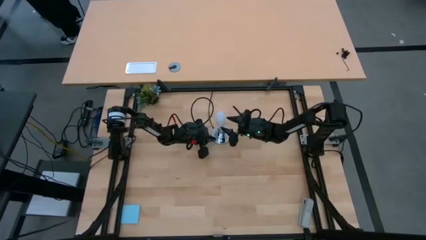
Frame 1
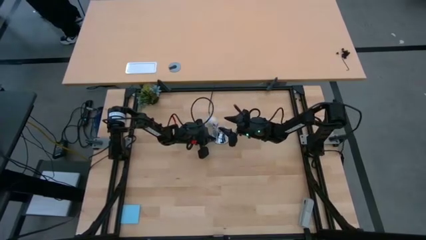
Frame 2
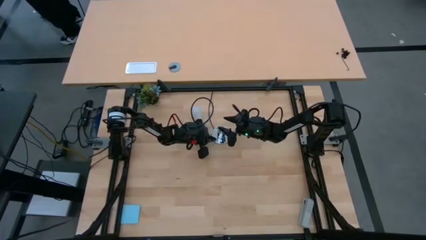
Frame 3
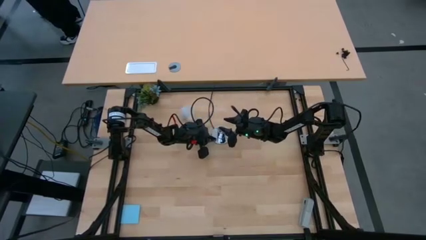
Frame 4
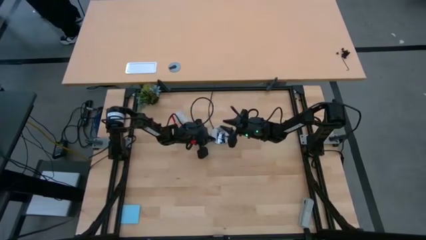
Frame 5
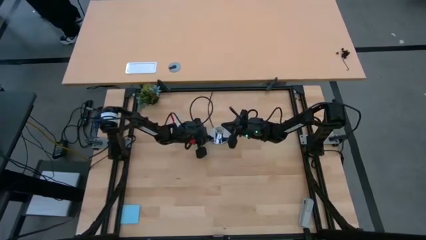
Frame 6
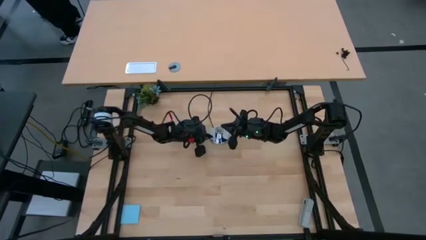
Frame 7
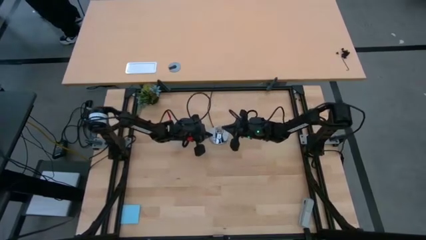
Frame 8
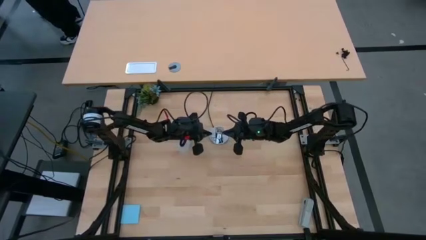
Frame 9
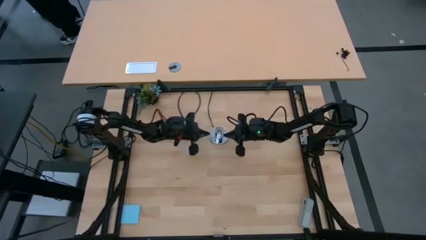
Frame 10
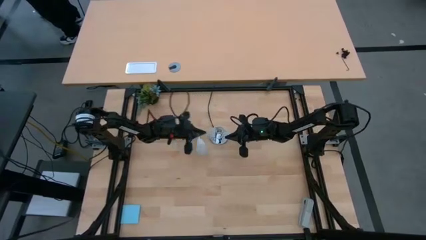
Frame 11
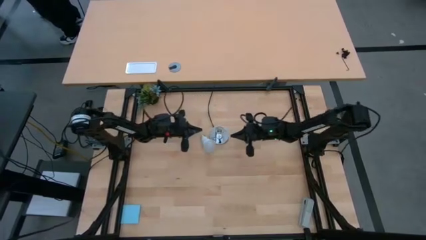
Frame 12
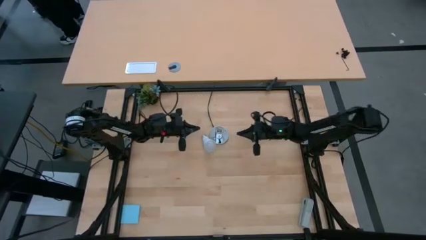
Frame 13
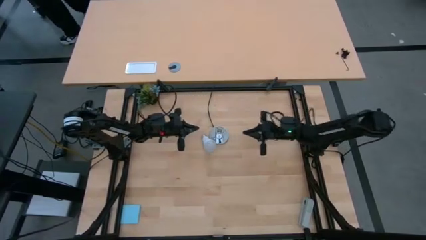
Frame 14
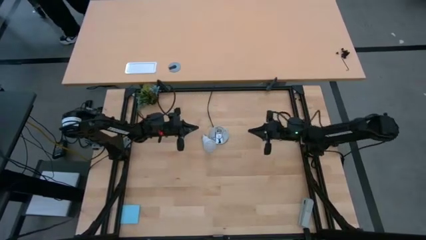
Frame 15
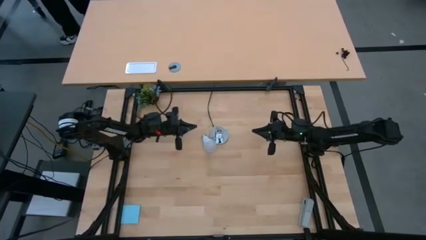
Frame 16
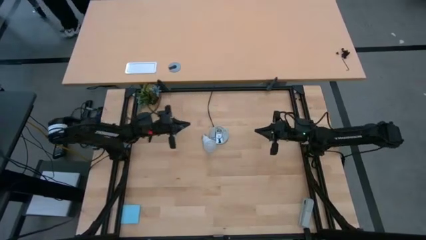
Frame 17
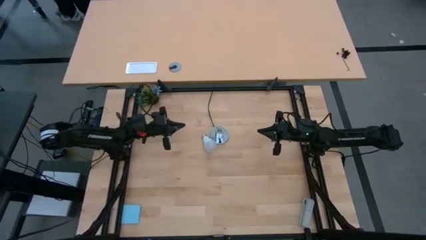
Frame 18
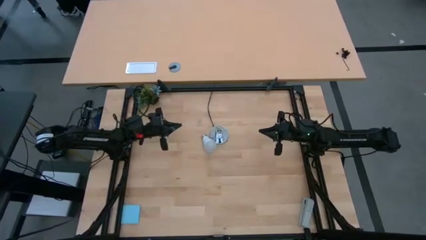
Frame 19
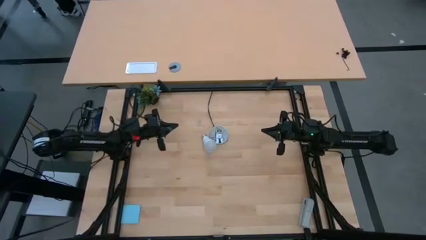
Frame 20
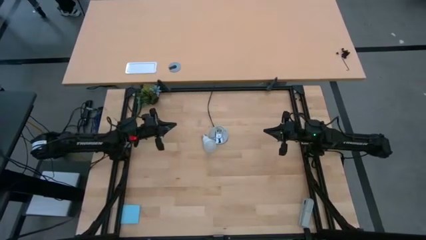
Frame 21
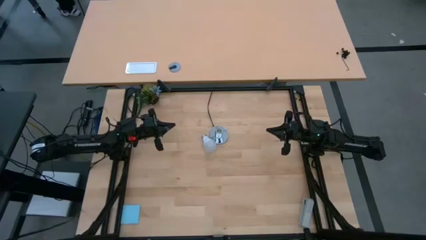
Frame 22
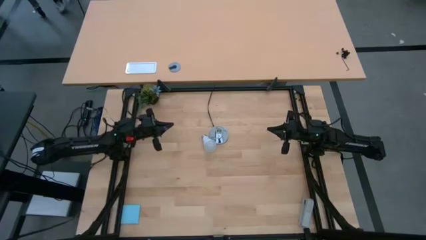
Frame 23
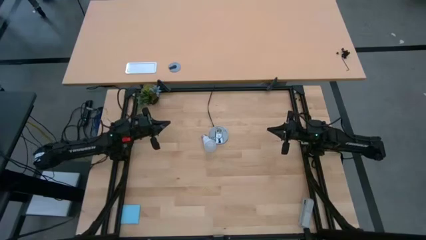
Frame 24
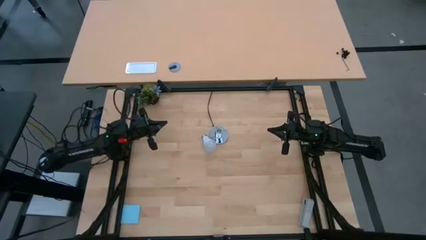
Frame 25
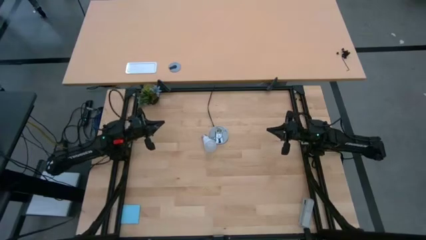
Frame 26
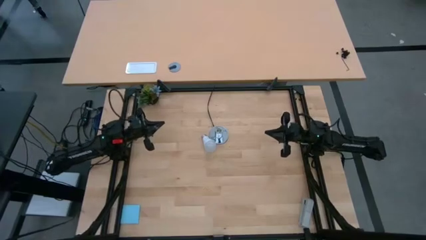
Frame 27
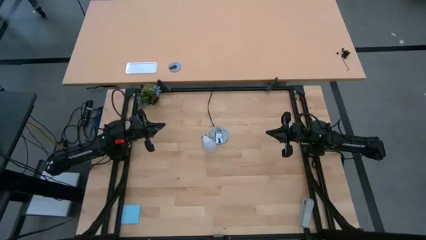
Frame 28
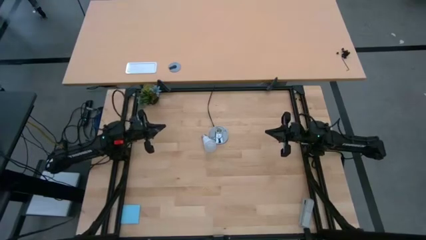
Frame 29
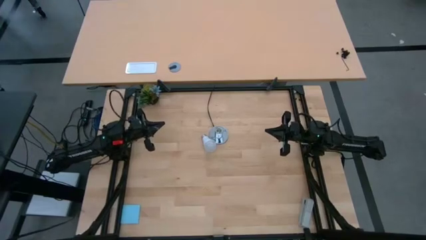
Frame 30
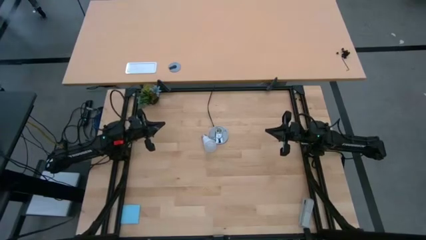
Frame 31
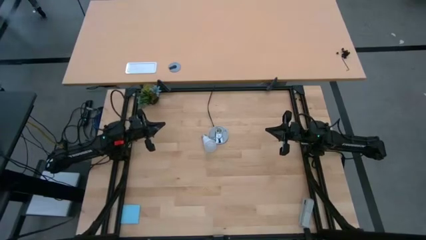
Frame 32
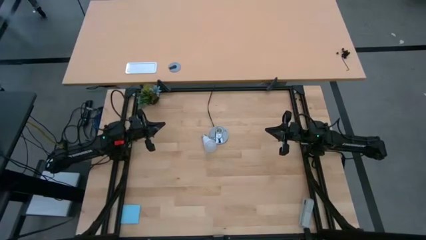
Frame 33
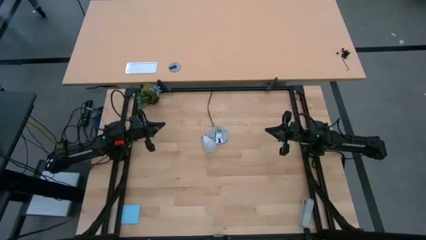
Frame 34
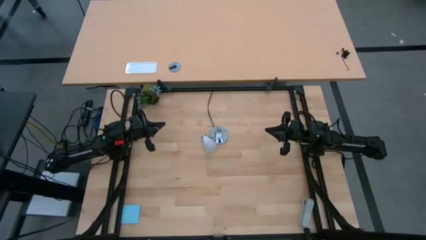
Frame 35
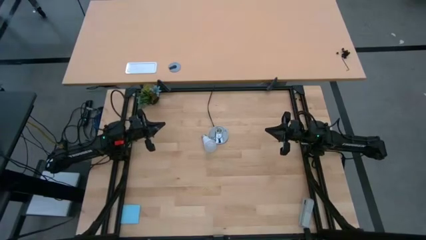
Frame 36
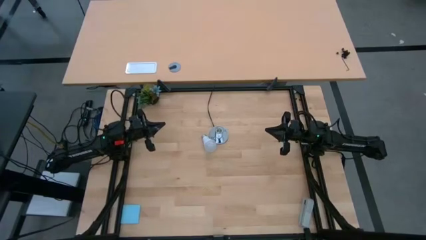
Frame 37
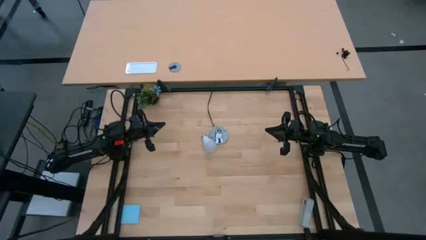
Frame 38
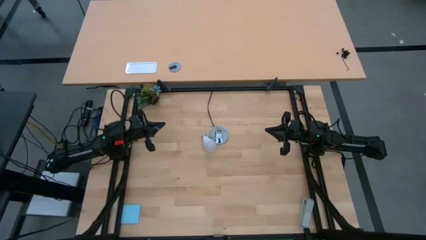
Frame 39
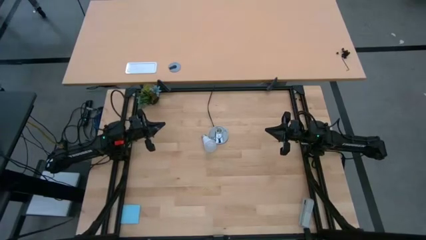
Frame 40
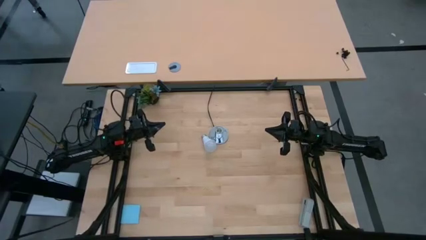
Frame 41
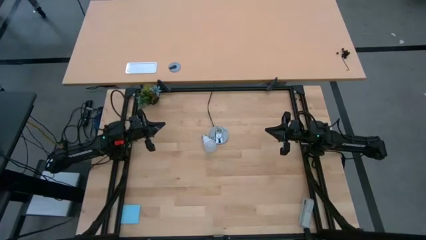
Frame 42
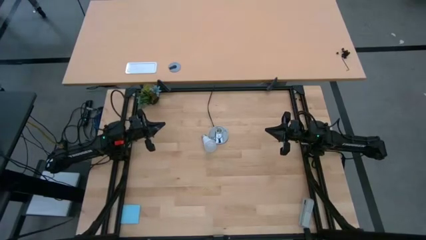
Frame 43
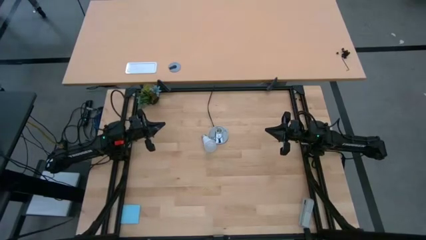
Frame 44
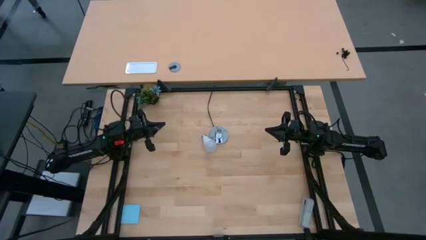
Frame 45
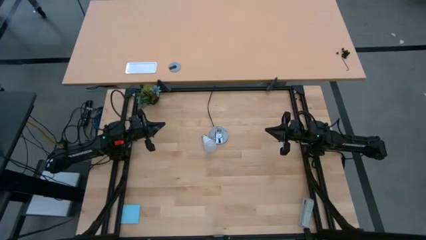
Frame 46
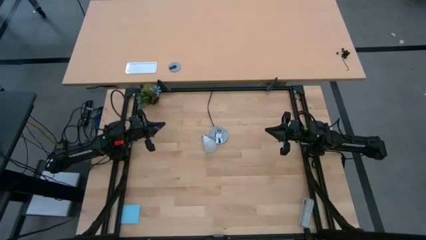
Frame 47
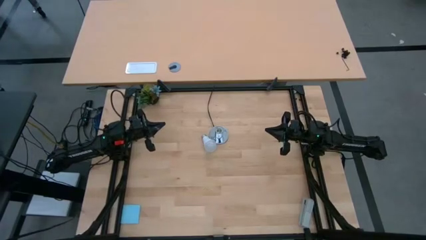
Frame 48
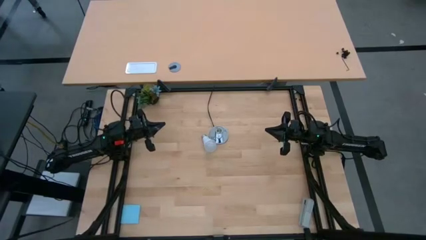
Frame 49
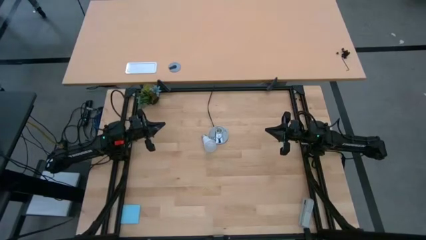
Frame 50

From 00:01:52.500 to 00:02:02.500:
Task: Screw lightbulb
Return to Home Position
